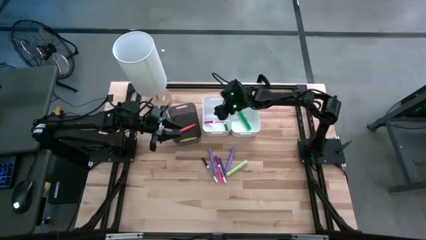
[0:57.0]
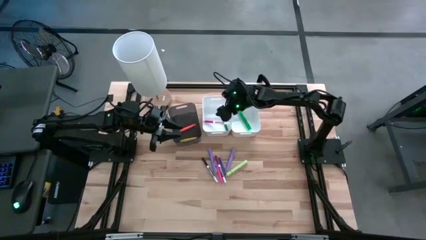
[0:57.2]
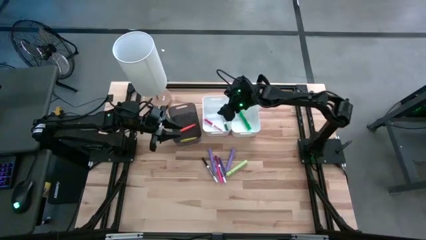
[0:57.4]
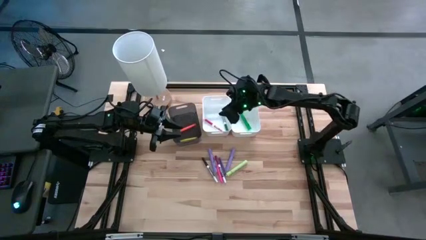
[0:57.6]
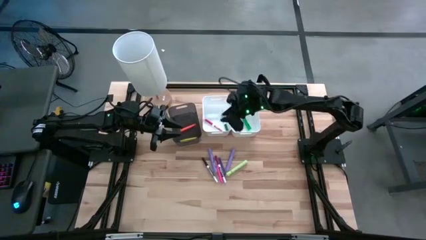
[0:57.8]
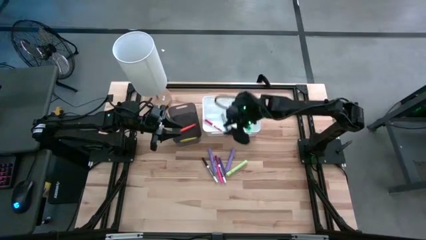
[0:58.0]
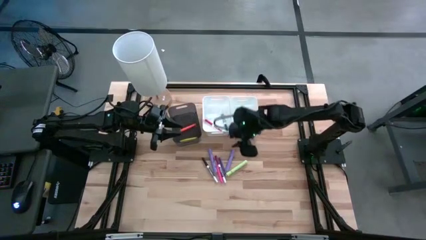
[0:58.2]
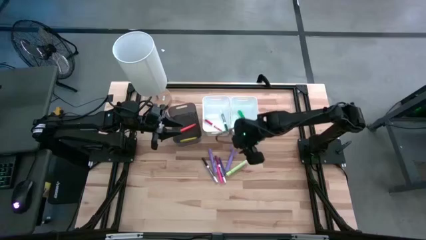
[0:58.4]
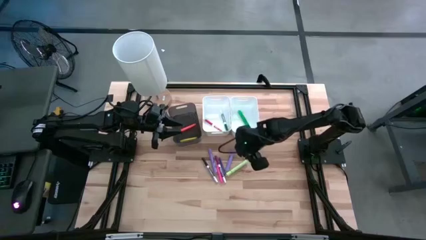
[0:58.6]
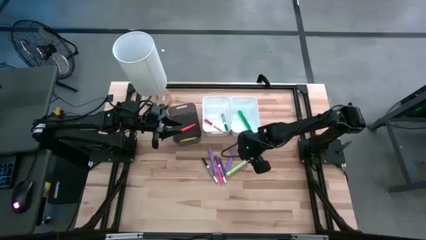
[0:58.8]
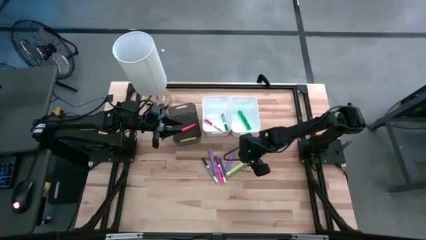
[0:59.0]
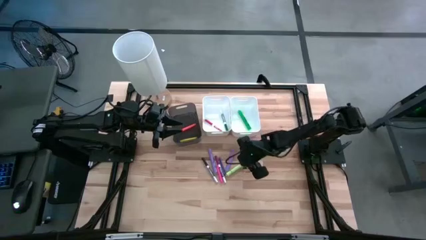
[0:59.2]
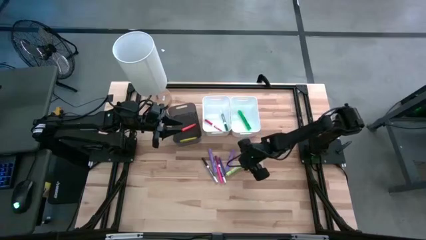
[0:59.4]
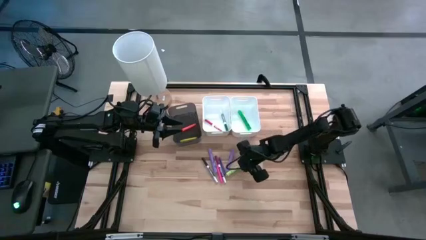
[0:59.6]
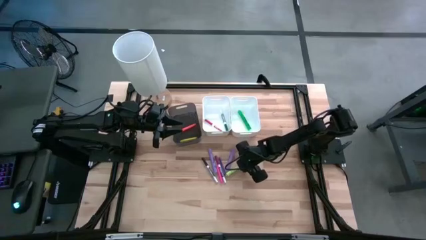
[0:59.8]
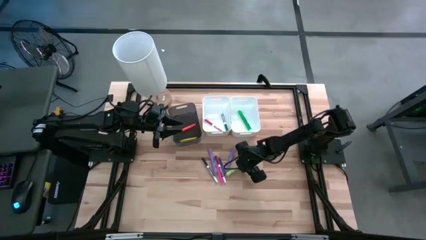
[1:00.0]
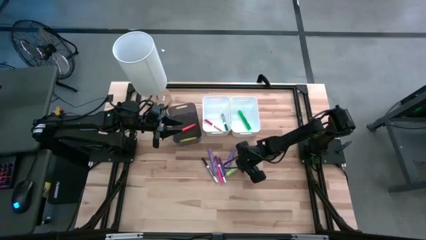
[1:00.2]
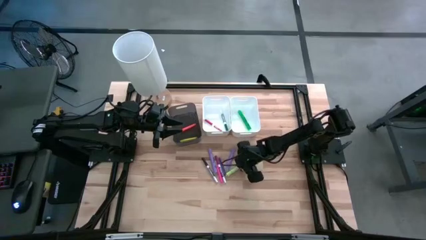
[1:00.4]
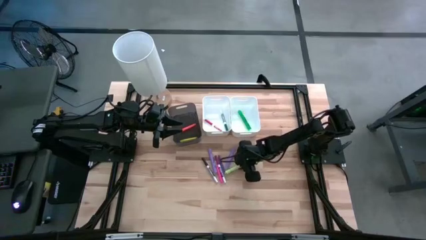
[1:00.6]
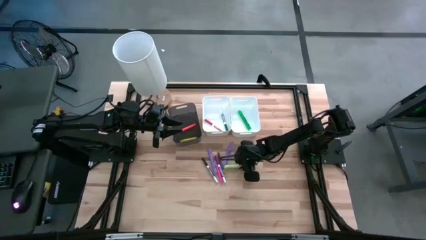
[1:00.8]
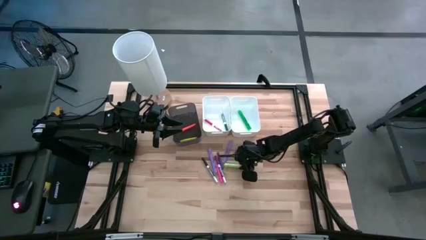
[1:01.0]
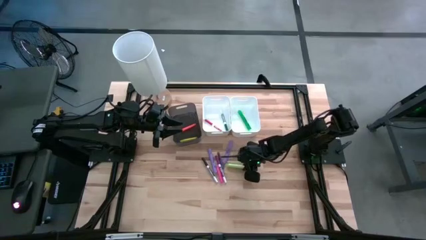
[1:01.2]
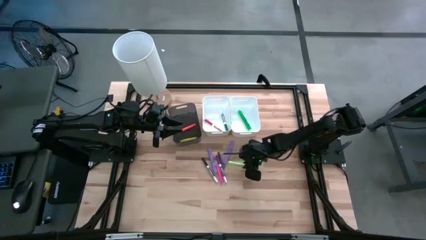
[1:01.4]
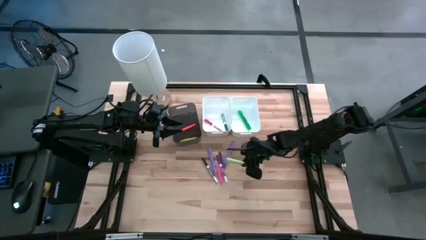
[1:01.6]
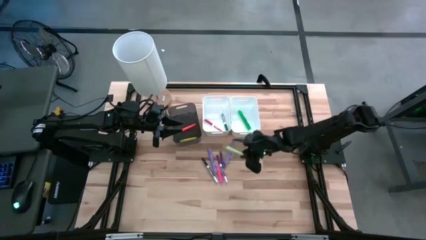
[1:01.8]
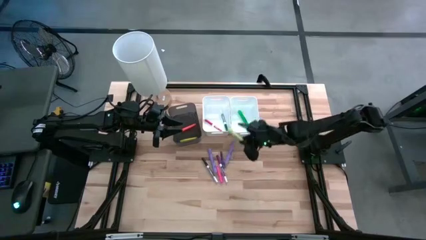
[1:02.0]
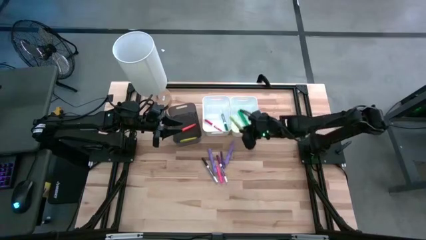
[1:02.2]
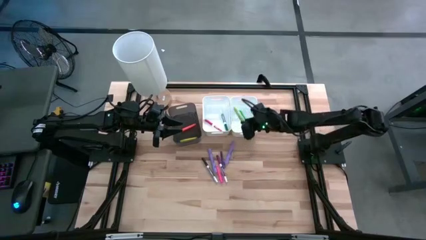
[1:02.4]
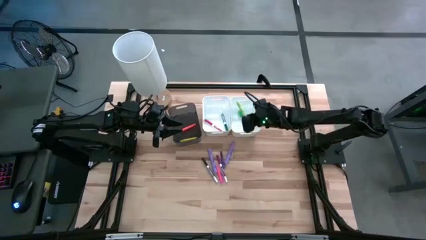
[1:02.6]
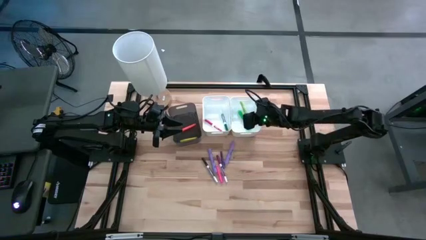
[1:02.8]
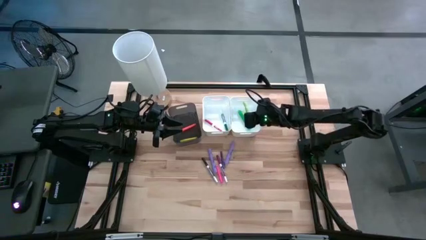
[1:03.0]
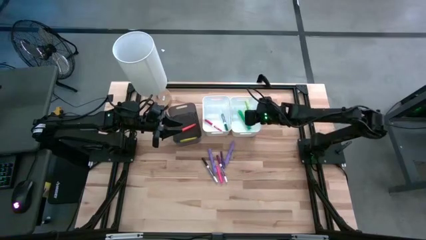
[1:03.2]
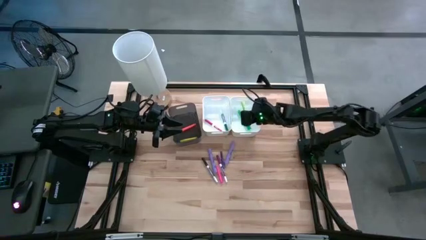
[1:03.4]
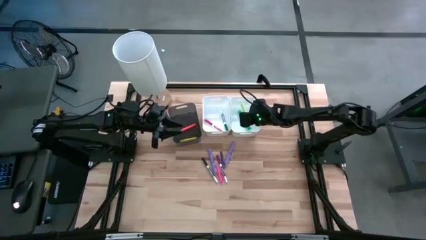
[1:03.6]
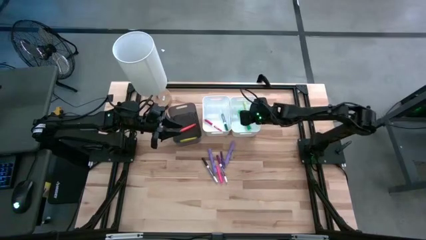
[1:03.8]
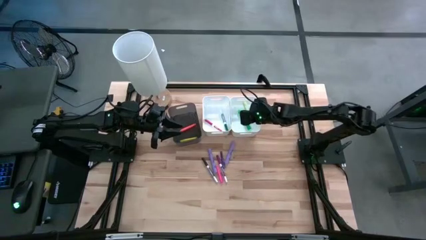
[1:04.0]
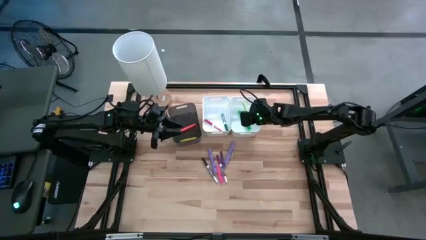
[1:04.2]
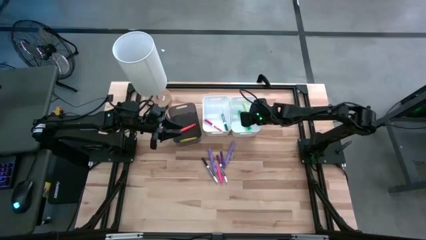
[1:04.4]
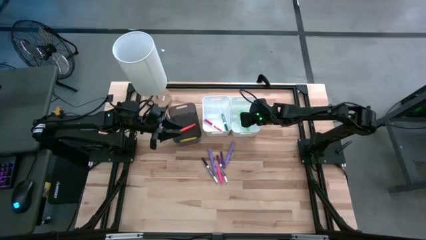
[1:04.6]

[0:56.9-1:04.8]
Task: Pick & Place Markers
Put the light green highlighter pen into the right white bin

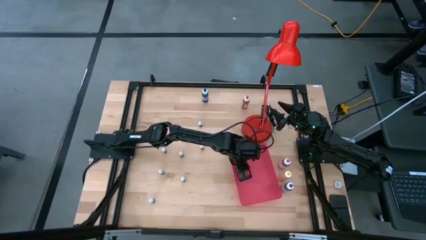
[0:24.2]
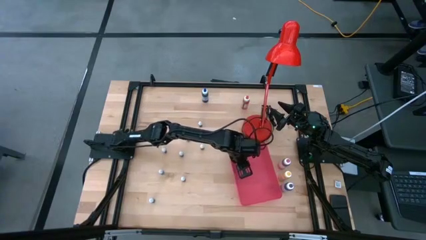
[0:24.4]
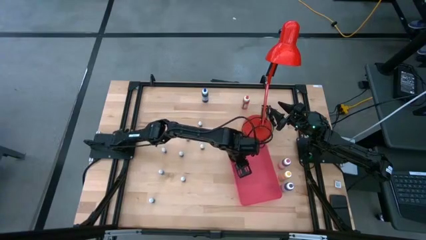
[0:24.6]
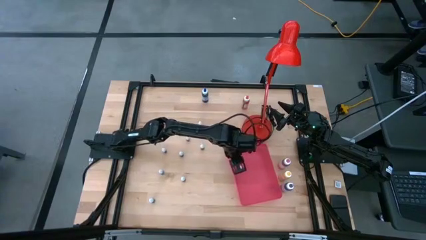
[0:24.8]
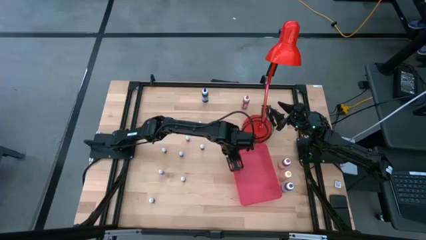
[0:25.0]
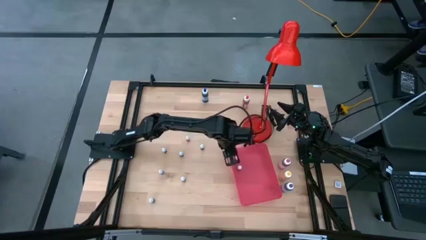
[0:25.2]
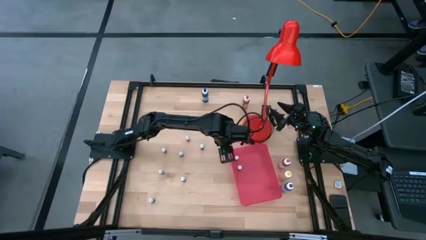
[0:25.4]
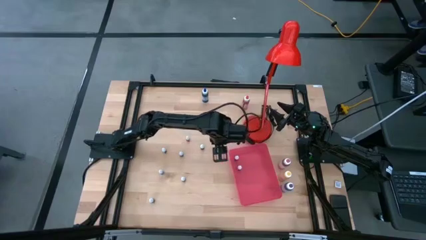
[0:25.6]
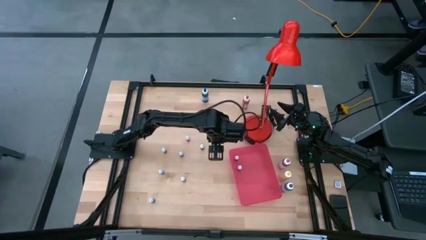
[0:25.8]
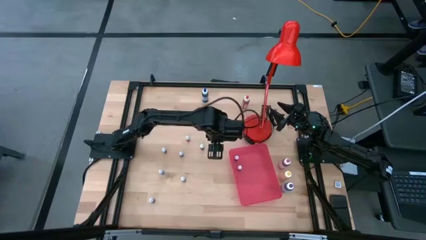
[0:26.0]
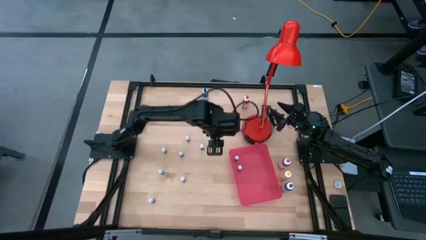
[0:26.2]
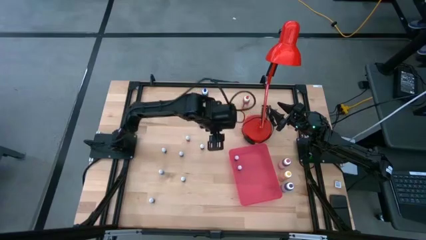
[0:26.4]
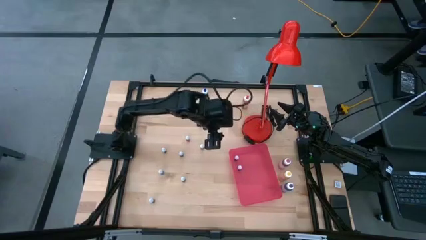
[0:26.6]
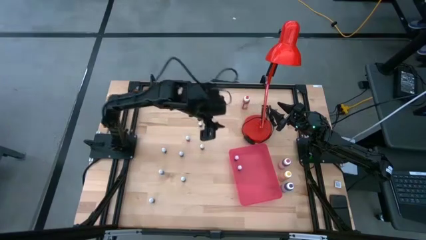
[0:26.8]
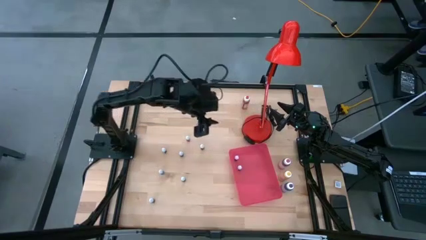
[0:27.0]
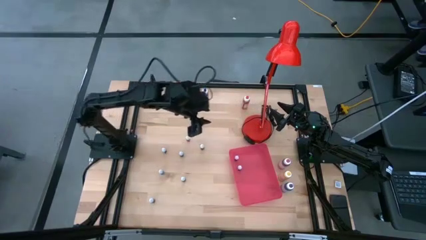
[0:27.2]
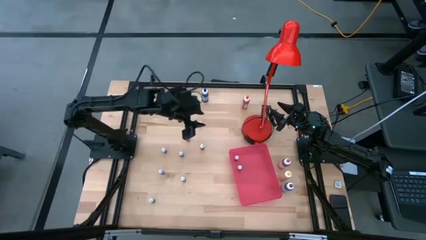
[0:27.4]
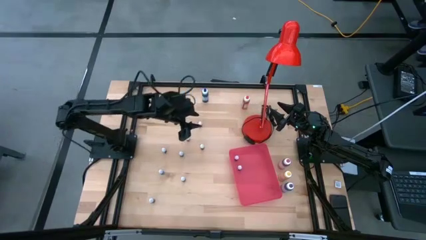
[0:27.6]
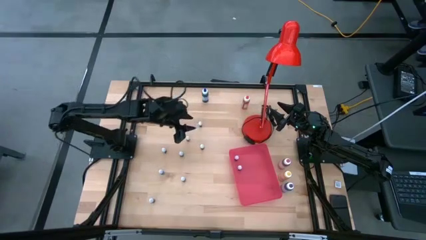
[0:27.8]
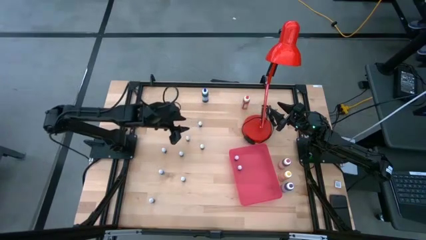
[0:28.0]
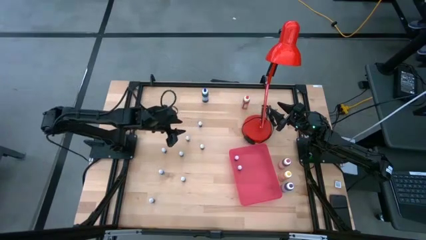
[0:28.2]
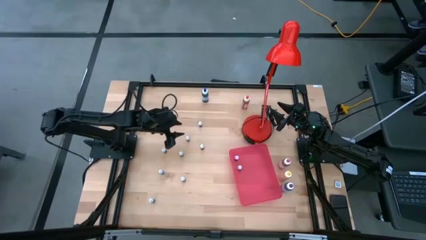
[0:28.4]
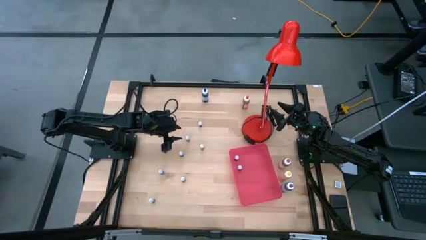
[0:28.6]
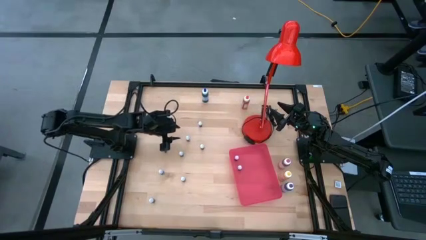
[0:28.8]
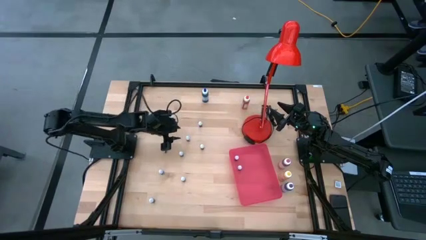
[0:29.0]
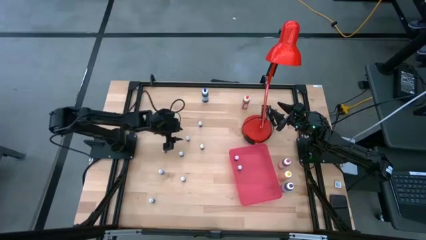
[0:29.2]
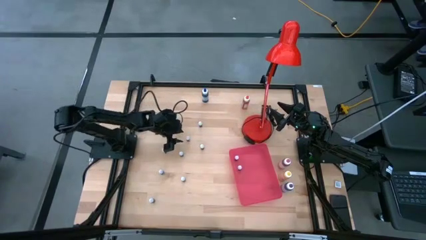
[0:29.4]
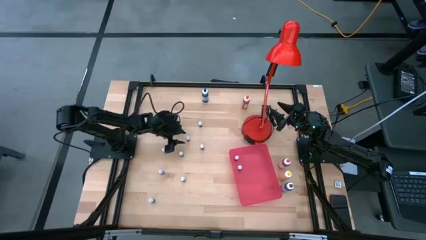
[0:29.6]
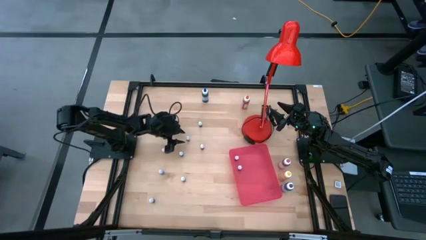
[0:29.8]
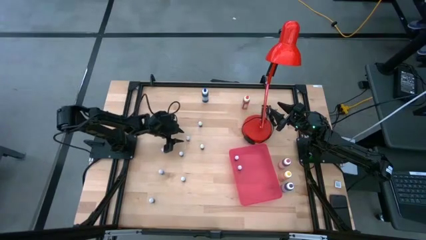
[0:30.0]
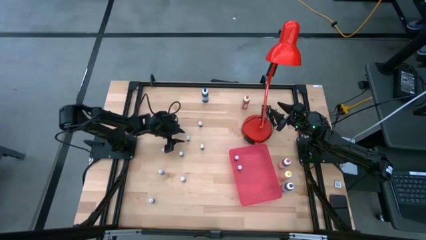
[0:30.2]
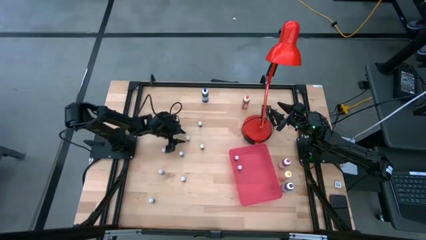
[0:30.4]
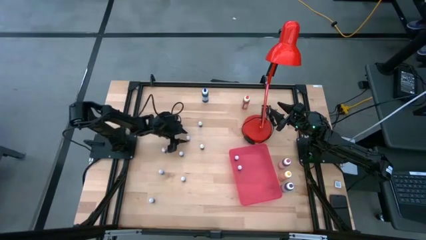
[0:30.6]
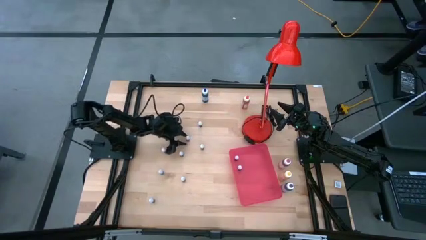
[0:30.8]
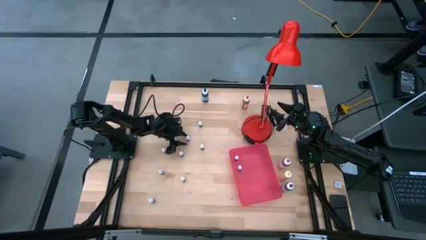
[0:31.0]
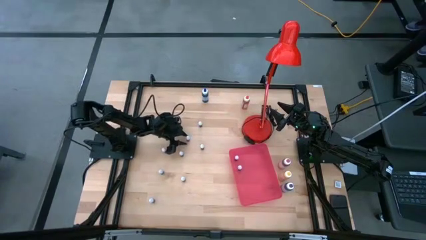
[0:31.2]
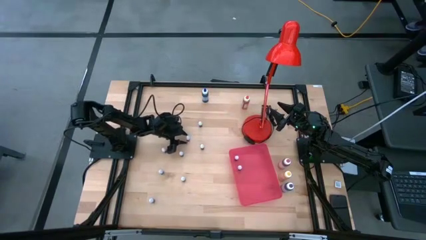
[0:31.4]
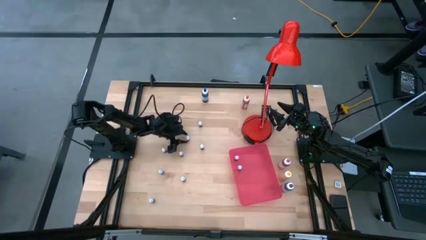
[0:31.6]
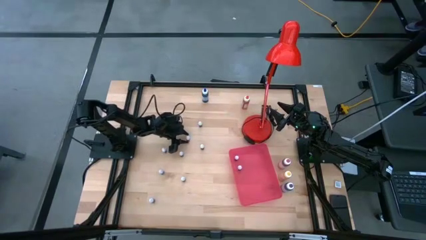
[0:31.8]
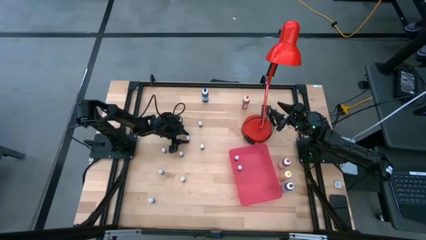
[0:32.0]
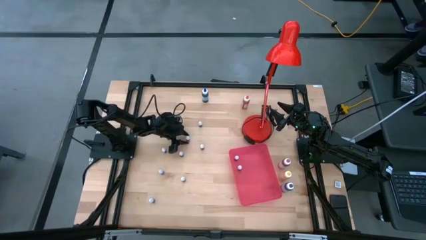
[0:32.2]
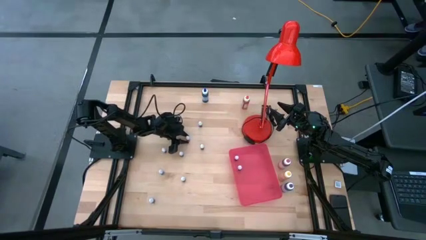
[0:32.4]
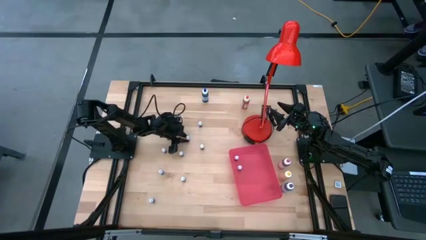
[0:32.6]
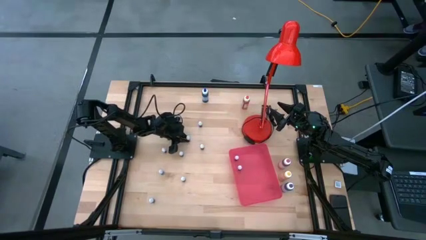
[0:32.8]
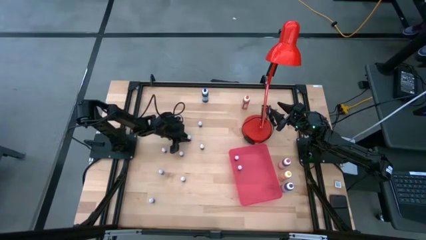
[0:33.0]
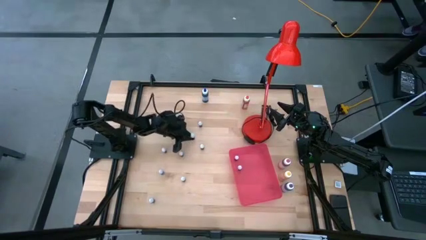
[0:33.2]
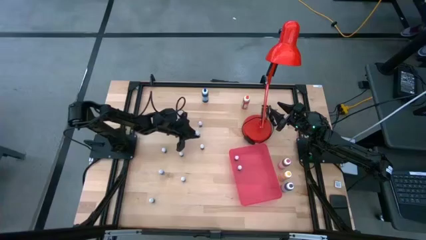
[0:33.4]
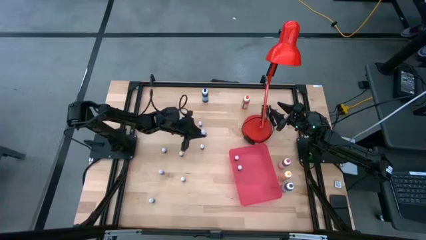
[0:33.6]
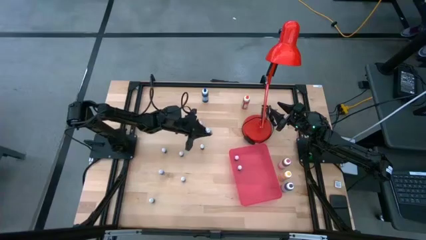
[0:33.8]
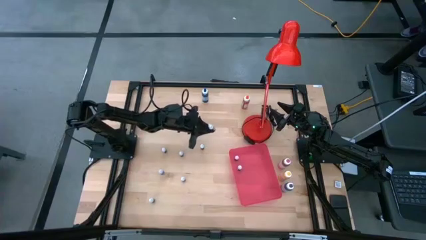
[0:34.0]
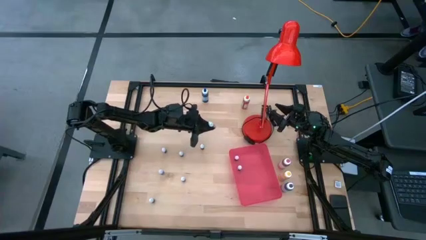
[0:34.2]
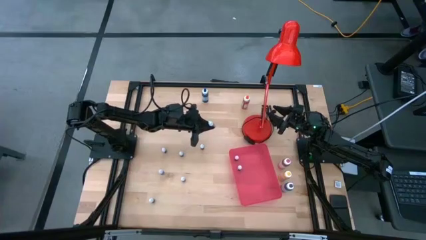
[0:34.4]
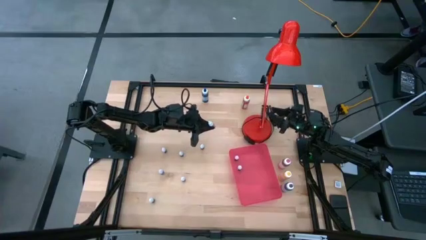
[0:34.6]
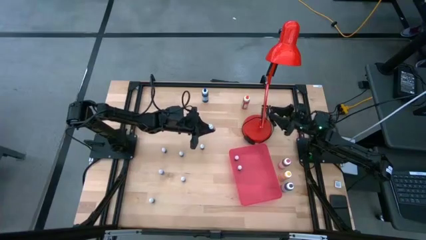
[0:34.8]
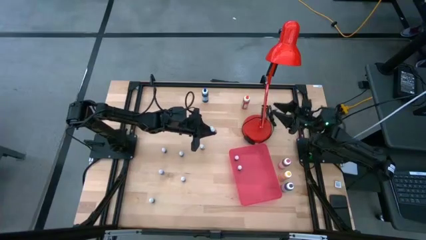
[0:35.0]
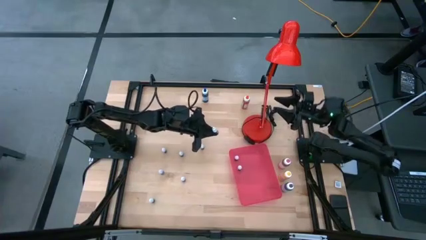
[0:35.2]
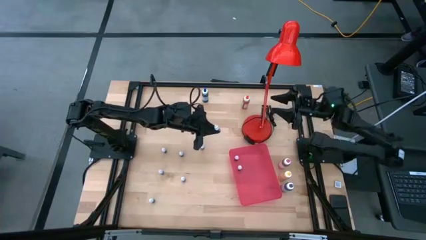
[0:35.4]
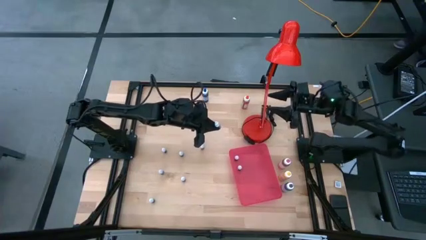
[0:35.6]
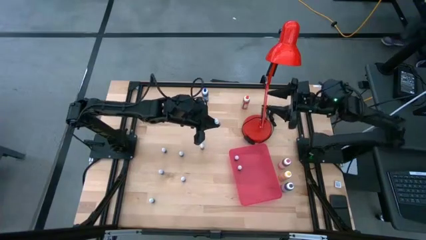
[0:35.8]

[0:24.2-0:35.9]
Task: Pick & Place food coloring
Put the small orange food coloring bottle into the red bin
